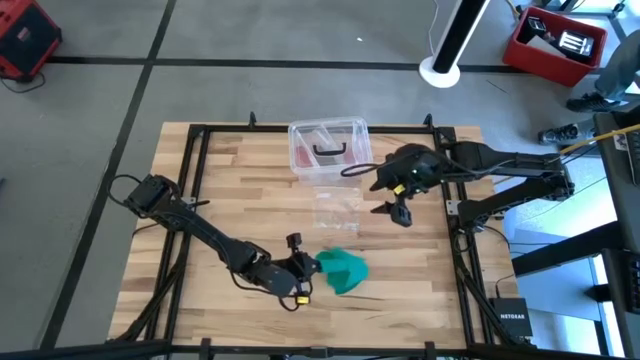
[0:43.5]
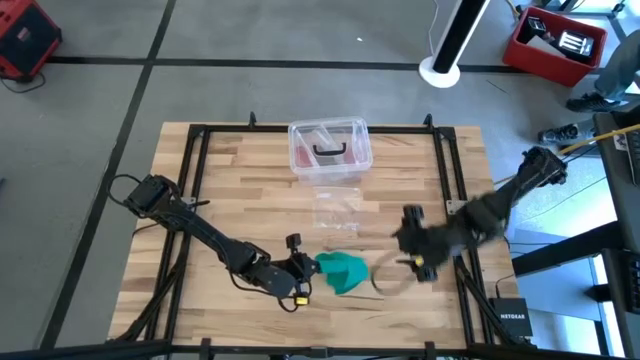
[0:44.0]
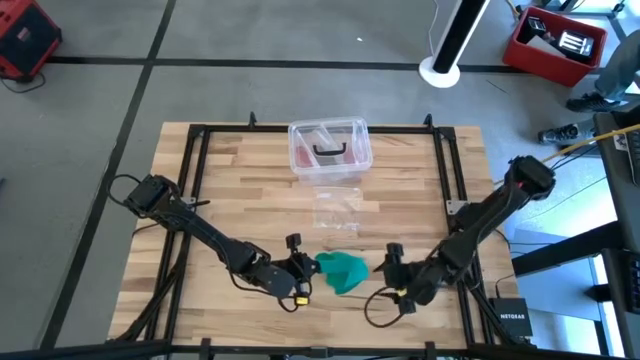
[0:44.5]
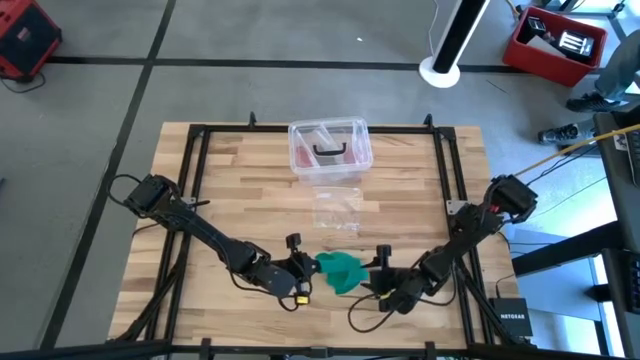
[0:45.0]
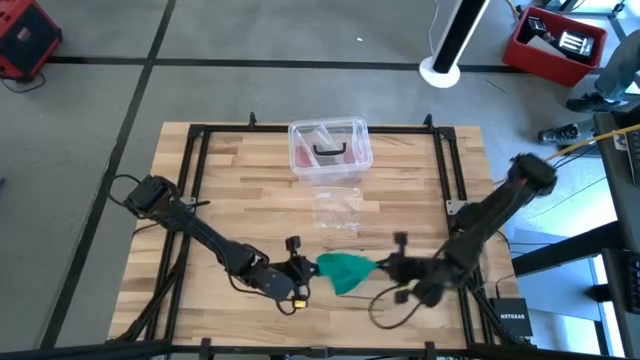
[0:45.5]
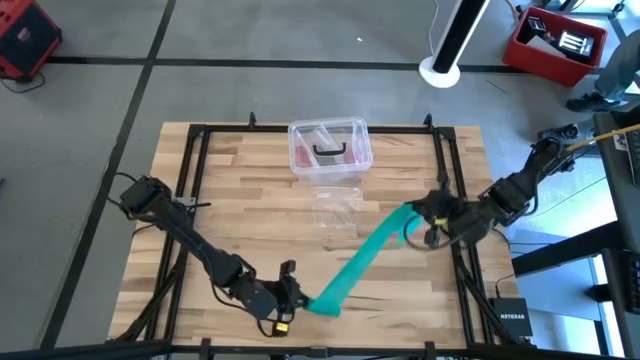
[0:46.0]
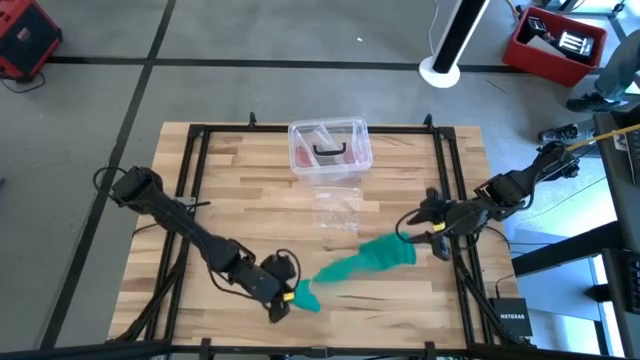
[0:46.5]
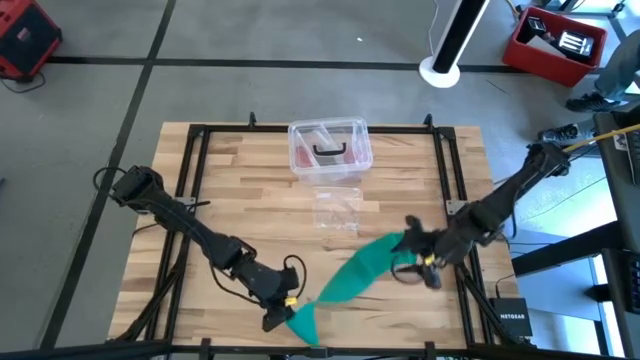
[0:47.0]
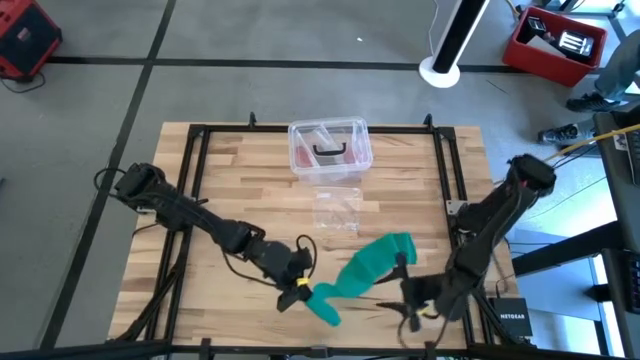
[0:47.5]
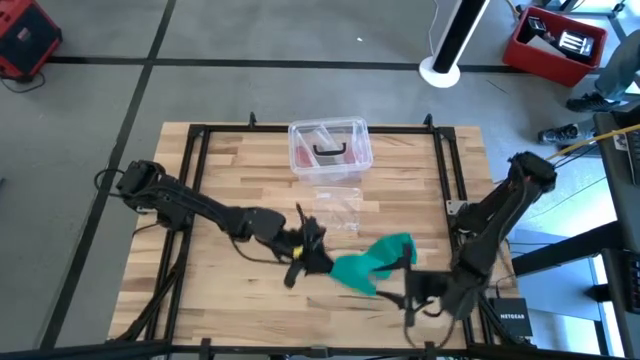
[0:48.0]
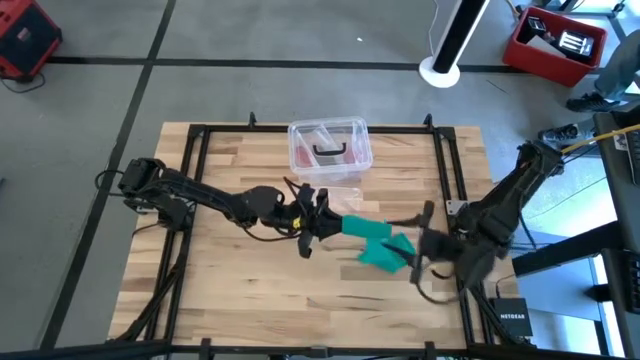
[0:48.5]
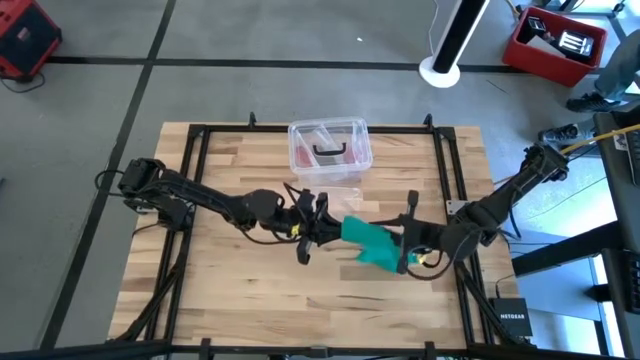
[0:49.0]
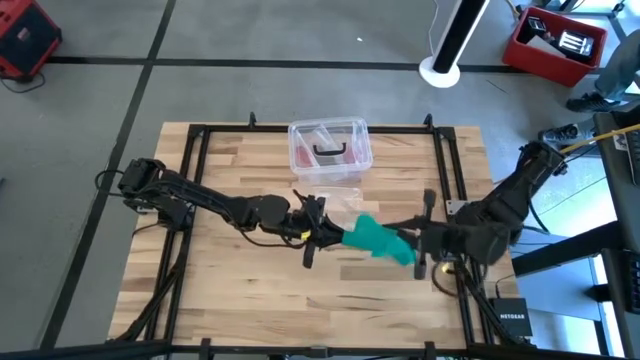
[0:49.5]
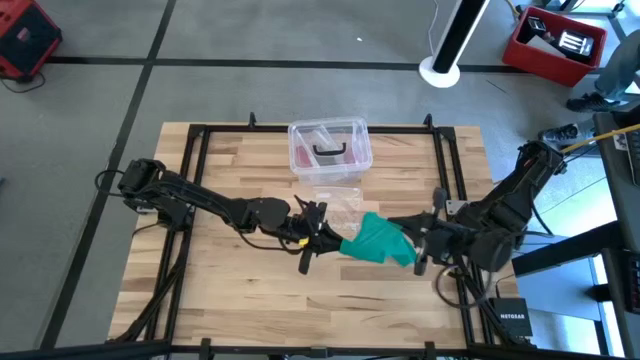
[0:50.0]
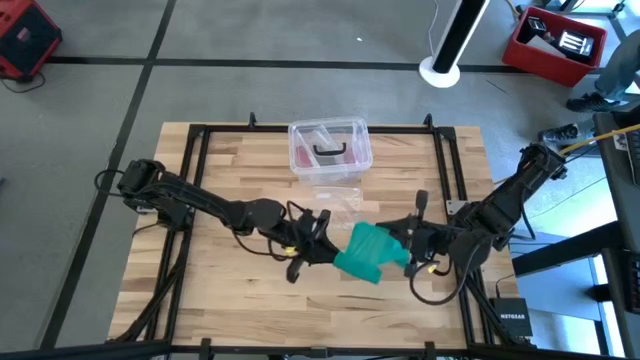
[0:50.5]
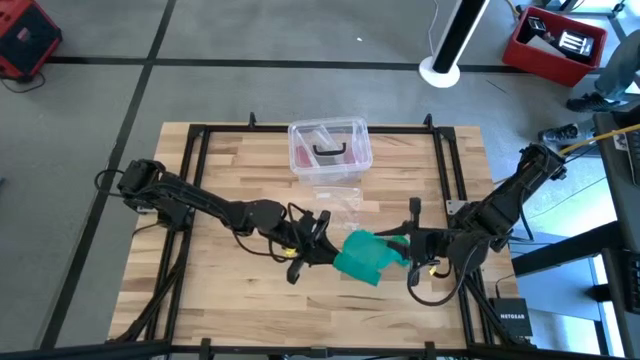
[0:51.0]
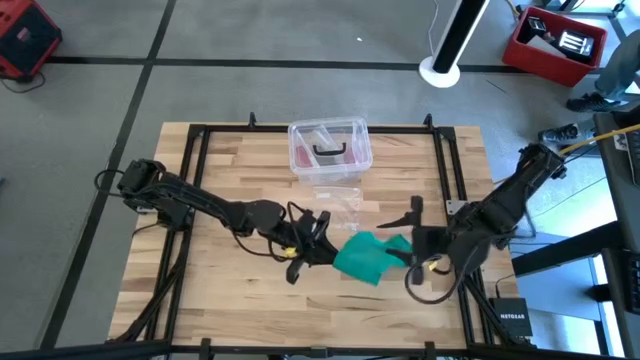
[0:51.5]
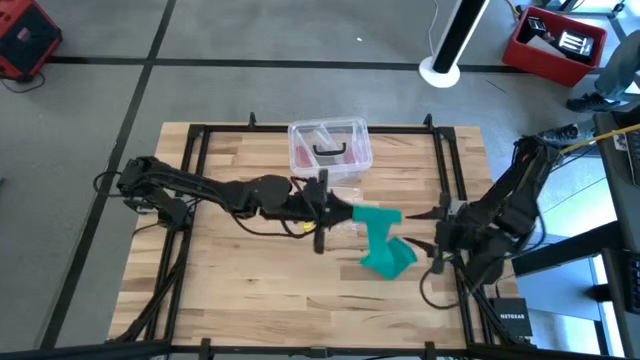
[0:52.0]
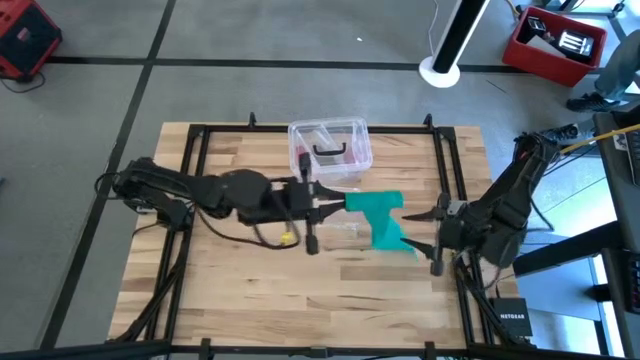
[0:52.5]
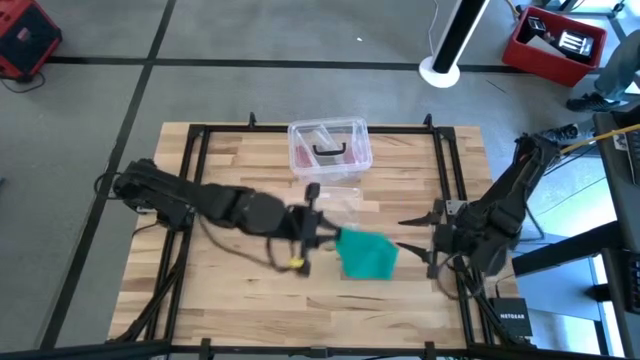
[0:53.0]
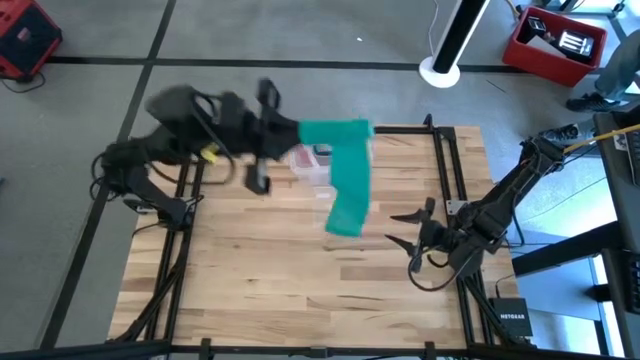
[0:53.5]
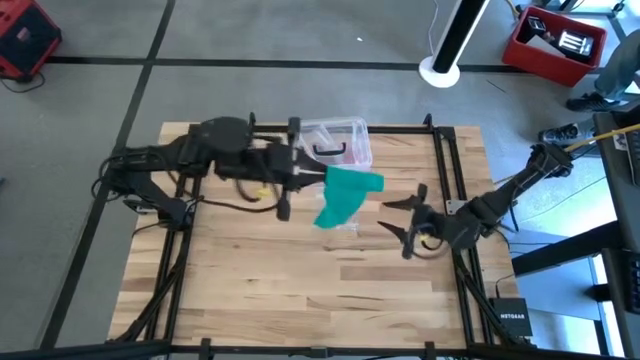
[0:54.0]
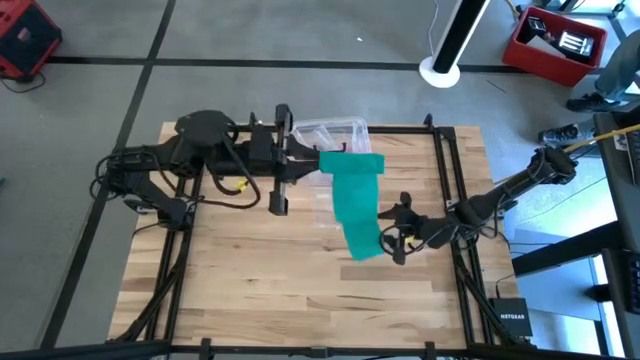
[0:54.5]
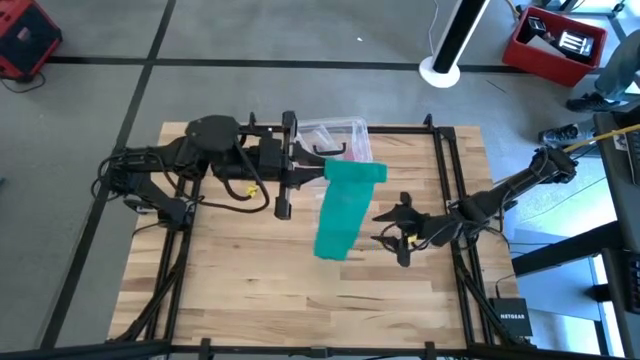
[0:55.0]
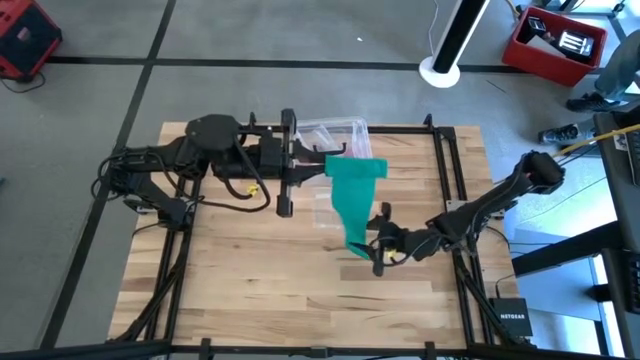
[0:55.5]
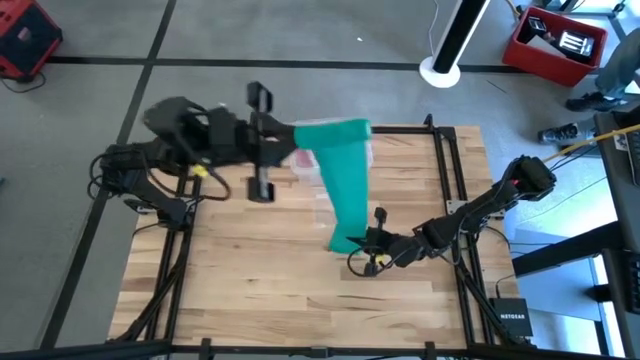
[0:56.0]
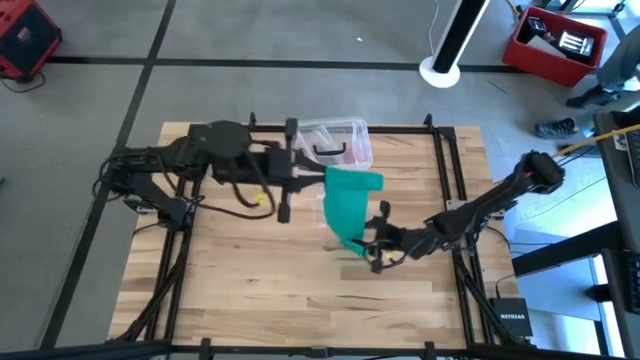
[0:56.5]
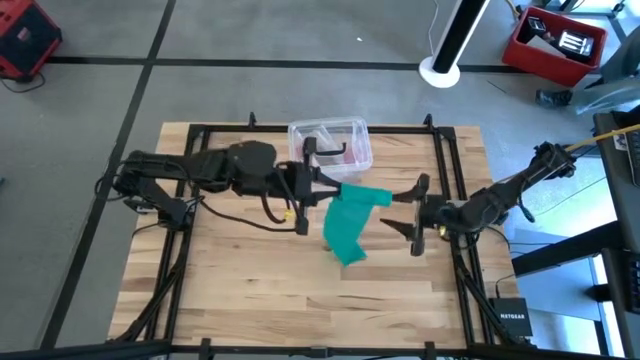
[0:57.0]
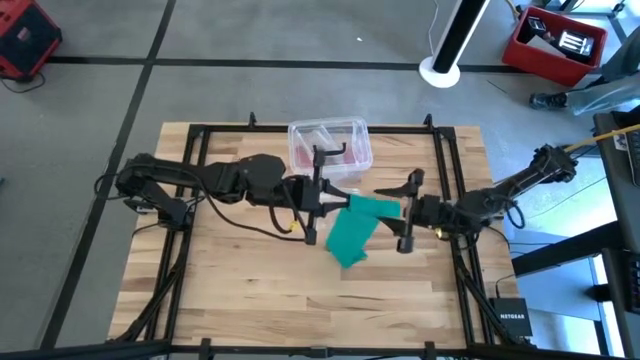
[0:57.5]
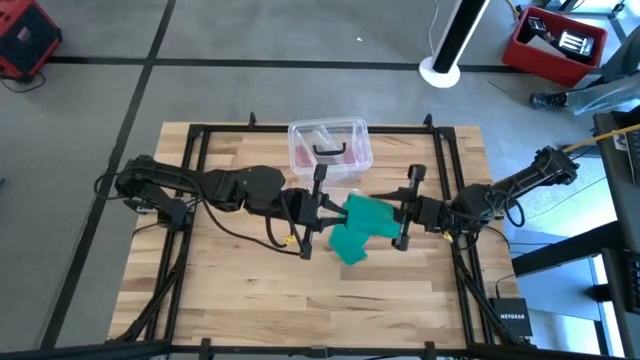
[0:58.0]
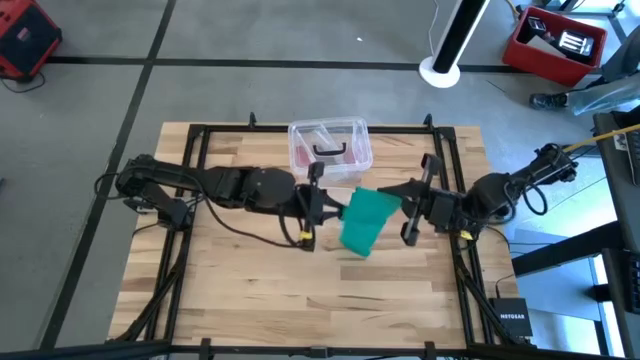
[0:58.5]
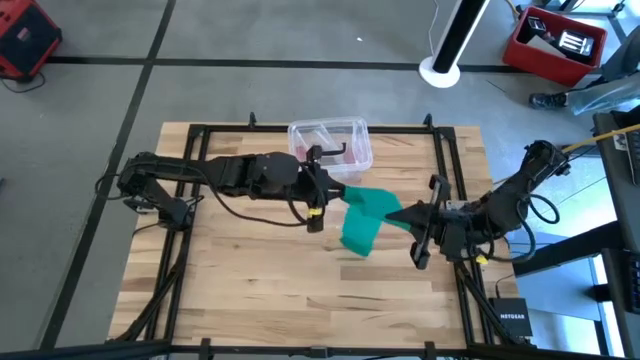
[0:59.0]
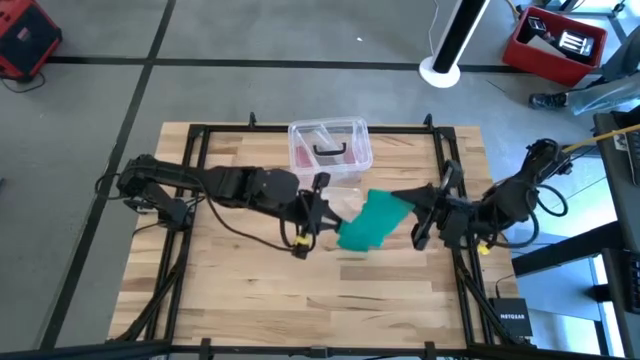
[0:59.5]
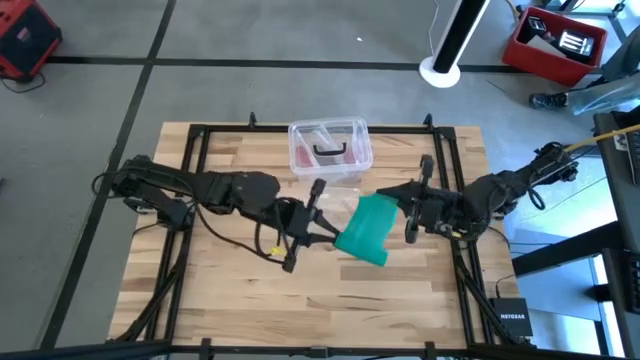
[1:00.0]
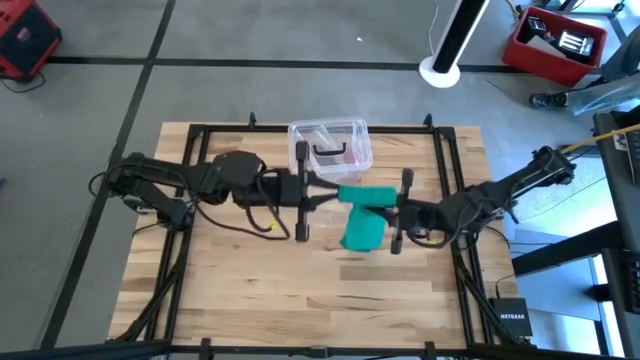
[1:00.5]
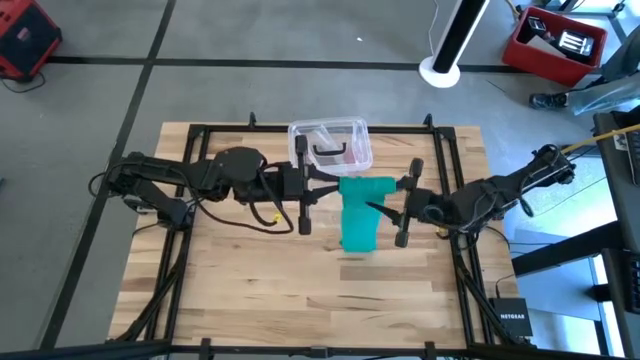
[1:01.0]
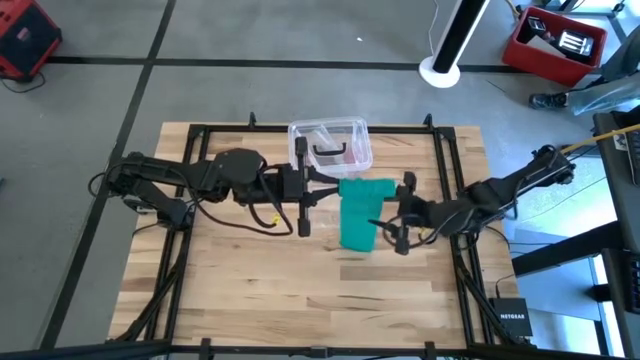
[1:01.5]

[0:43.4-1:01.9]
Task: Roll bandage
Roll the green bandage

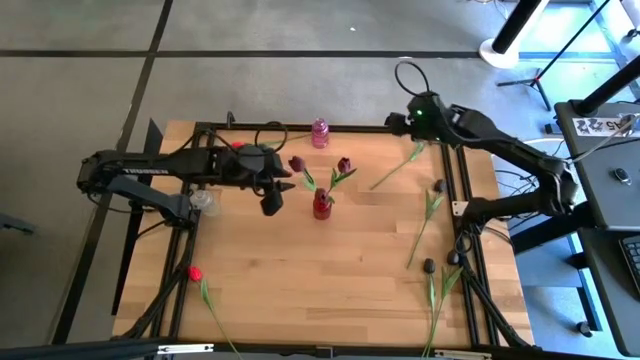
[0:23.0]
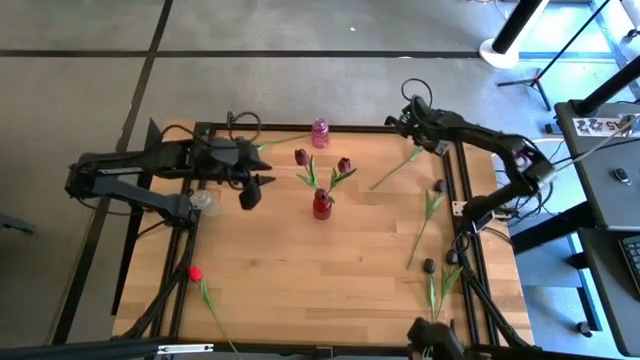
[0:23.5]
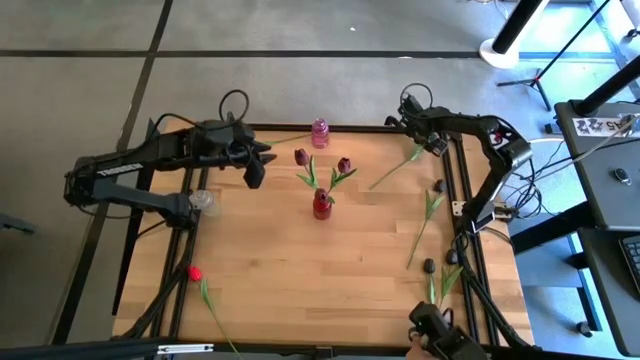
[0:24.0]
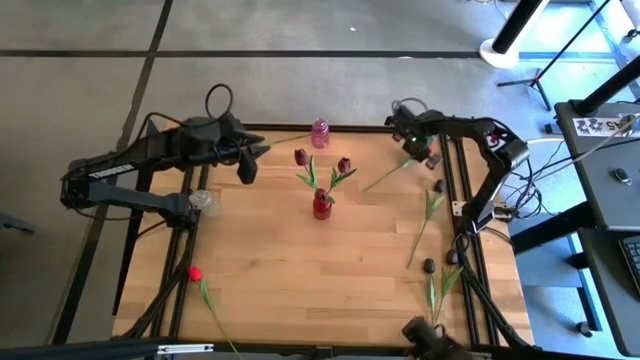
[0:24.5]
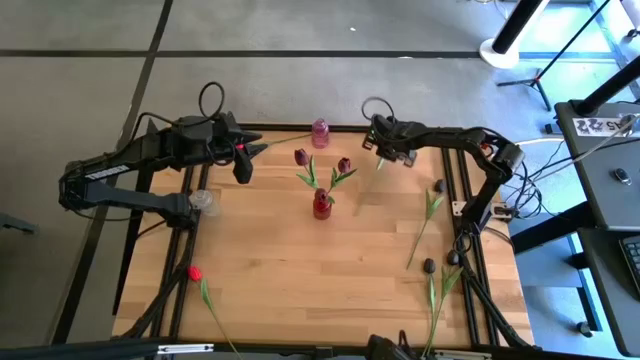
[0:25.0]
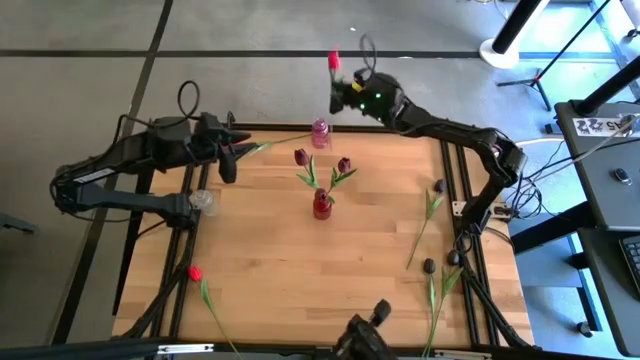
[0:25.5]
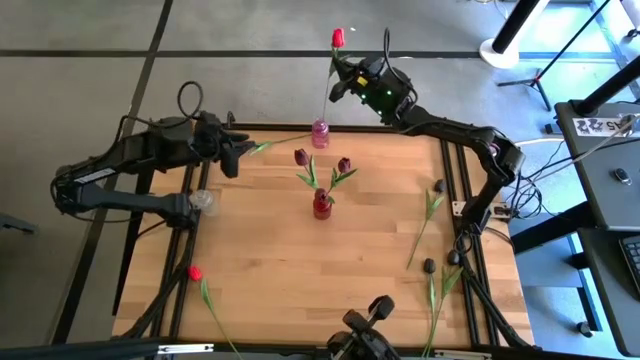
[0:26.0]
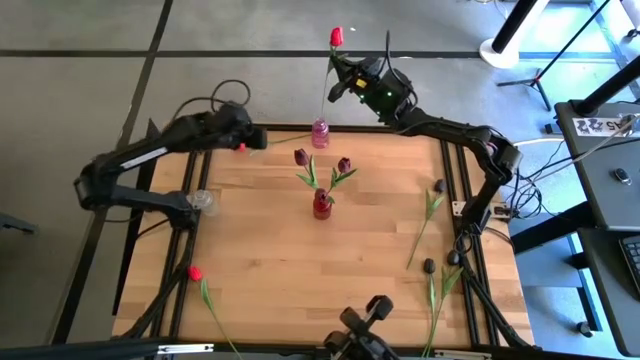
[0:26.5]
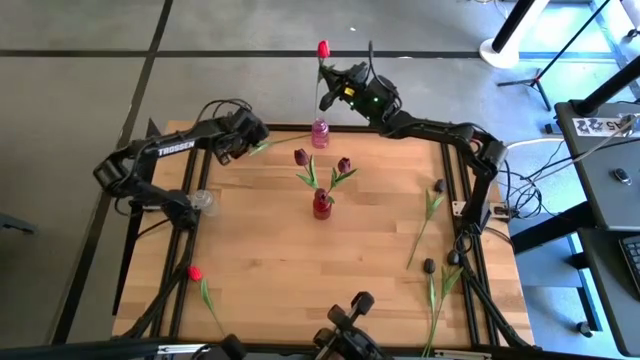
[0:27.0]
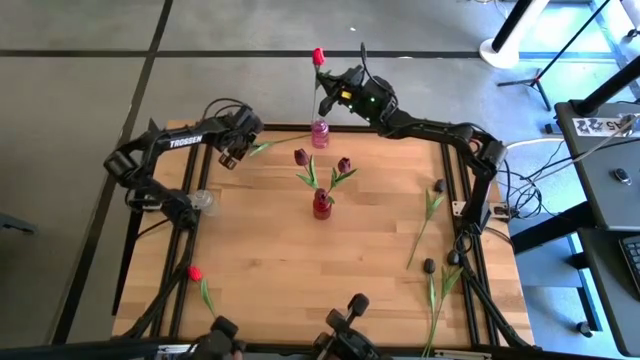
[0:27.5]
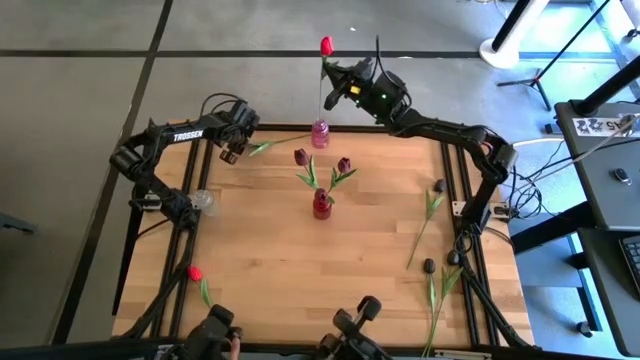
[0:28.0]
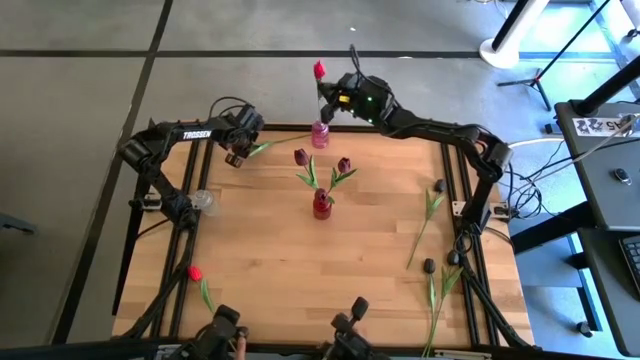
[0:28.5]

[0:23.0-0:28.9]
Task: Sort flowers into vase by color
Put the top right red flower into the purple vase
